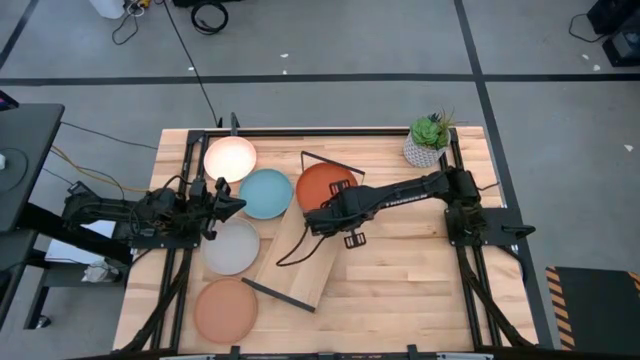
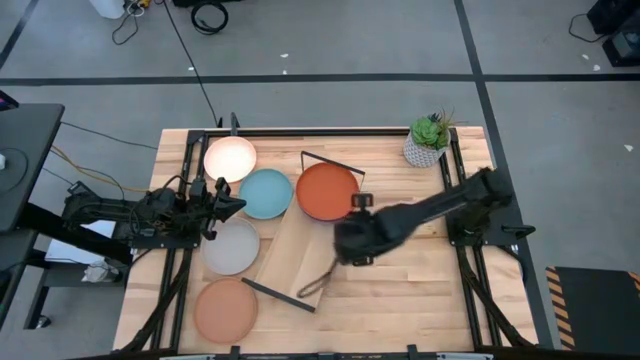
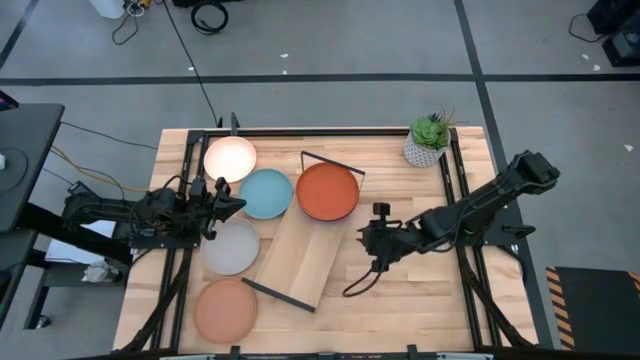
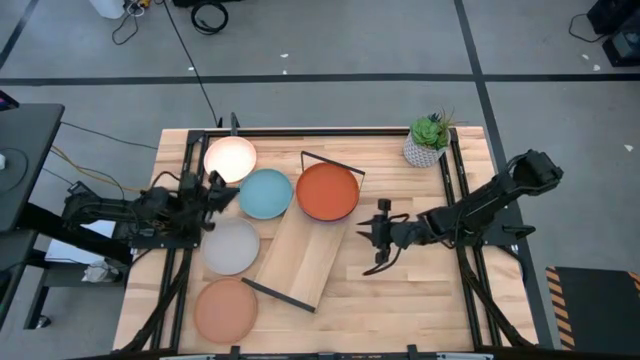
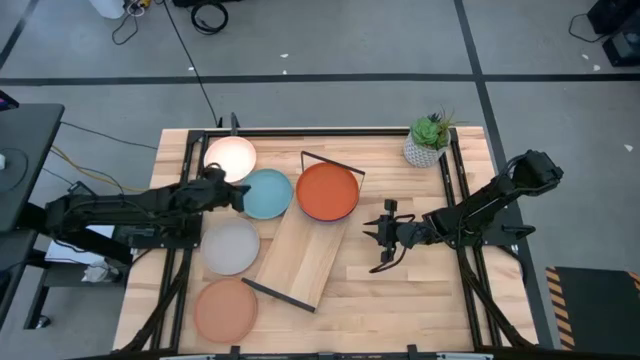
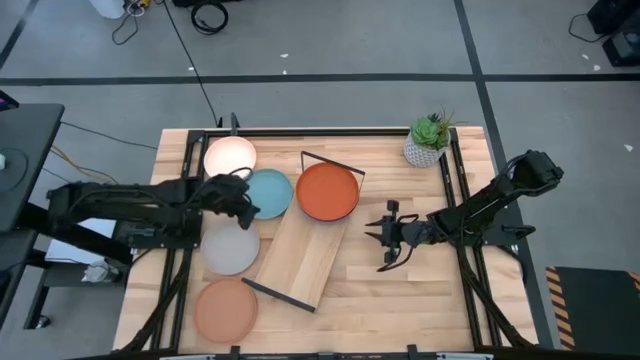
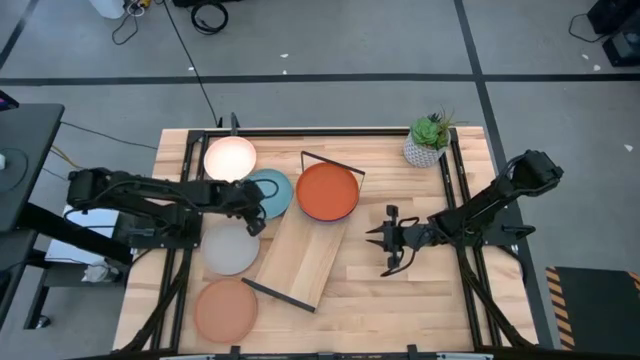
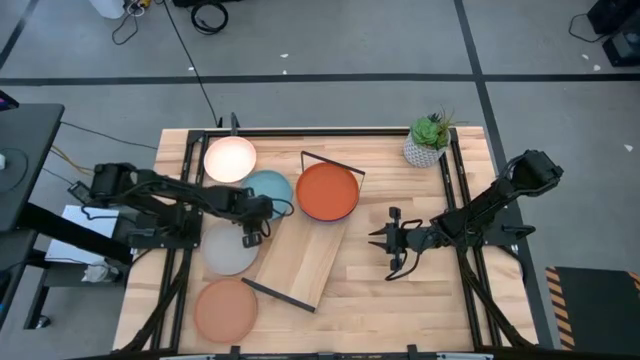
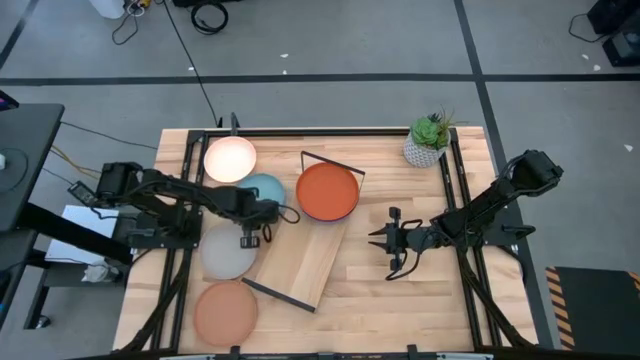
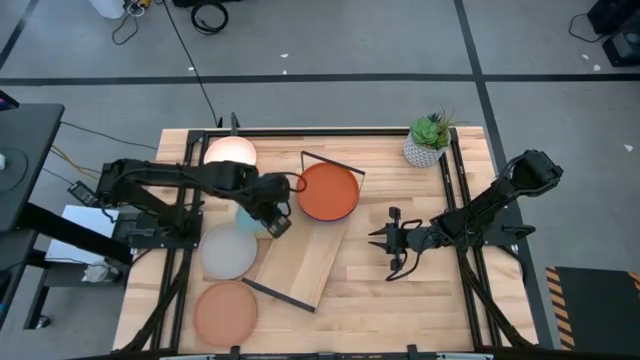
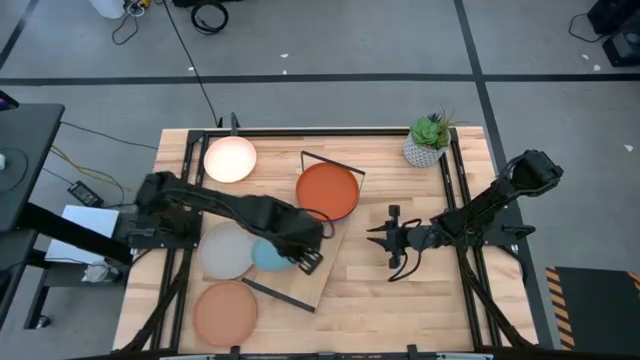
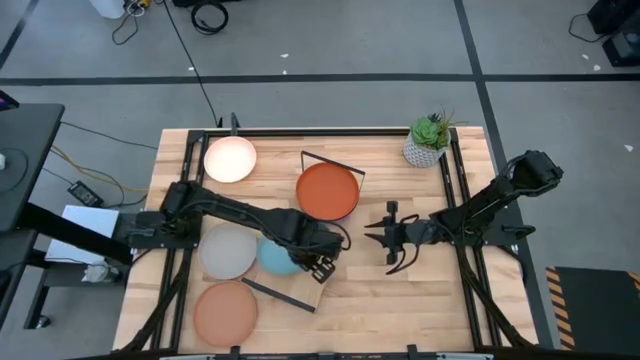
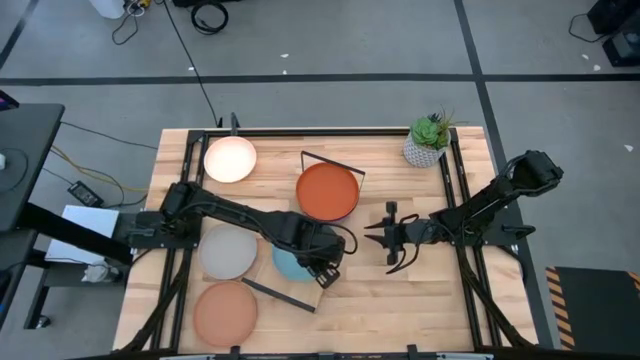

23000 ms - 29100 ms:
Task: Place and stack plates onto a shelf
Put the light blue plate on the shelf

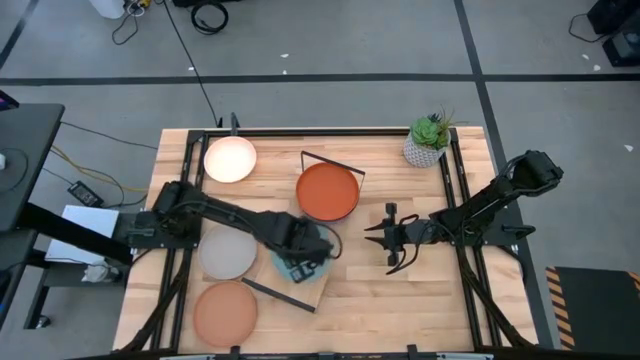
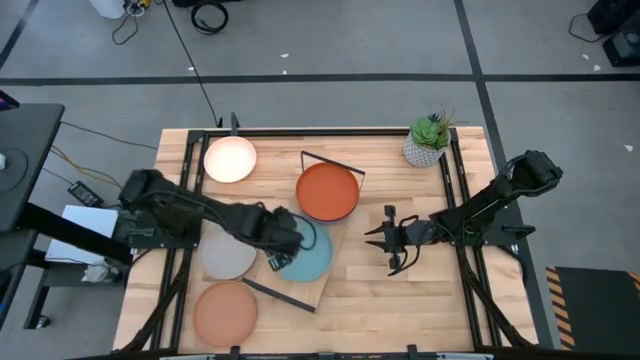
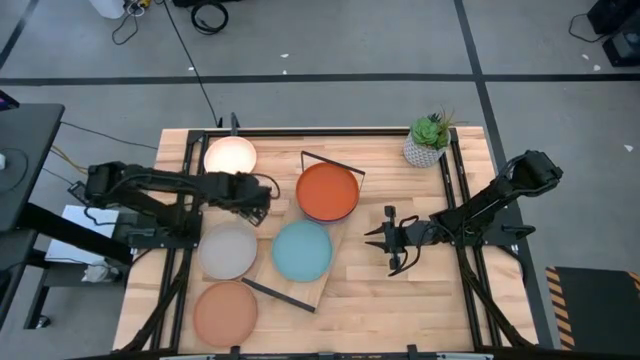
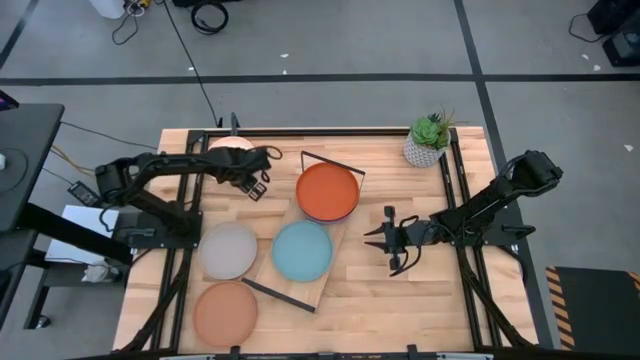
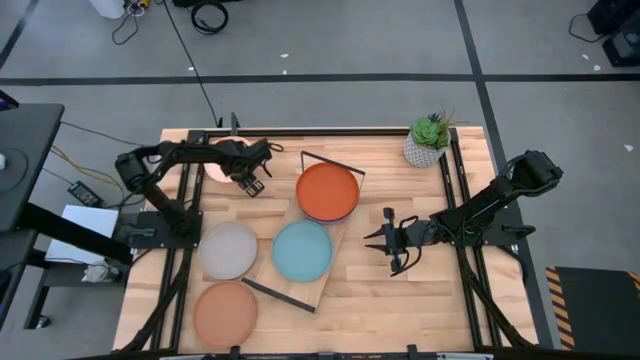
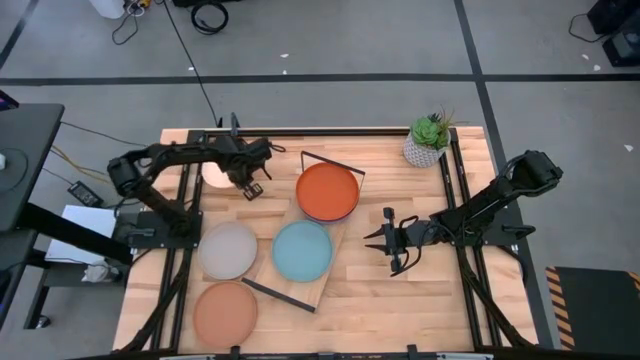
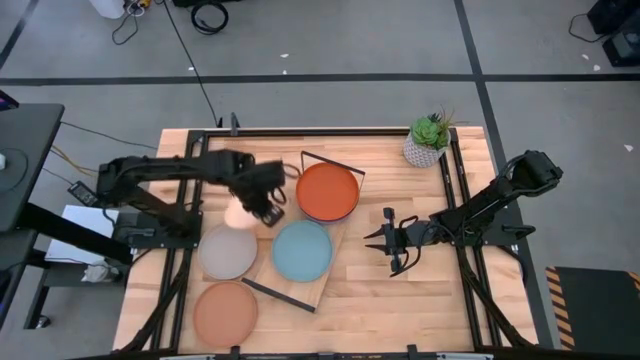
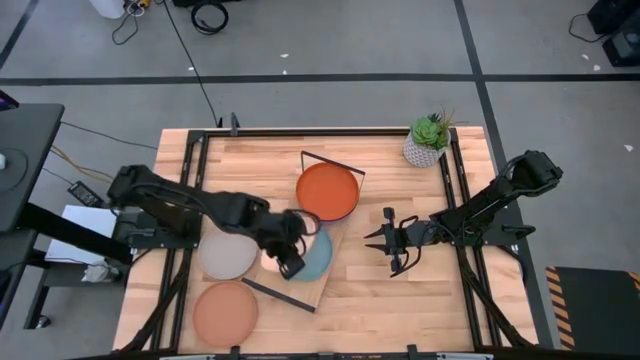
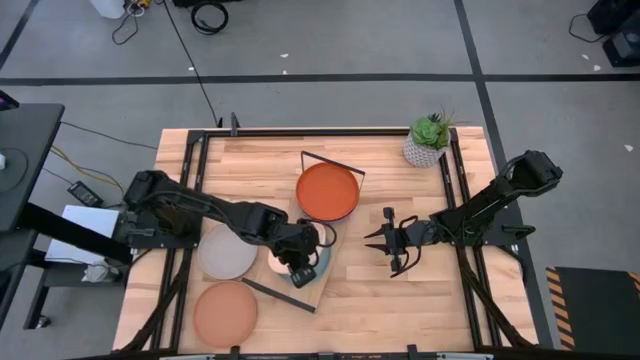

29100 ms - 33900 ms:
Stack the white plate on top of the light blue plate on the shelf

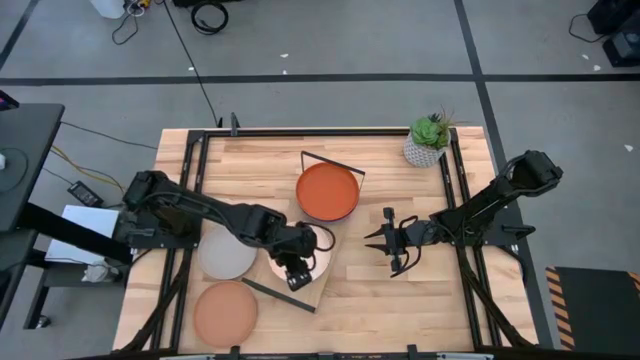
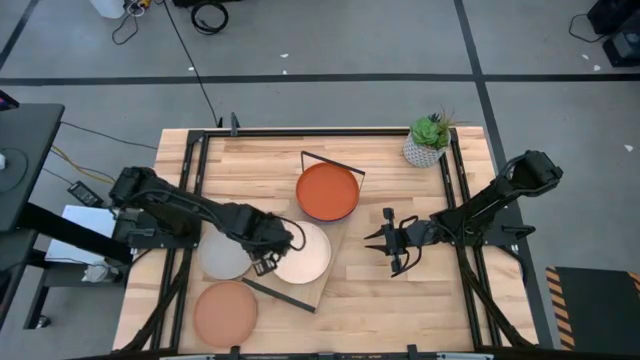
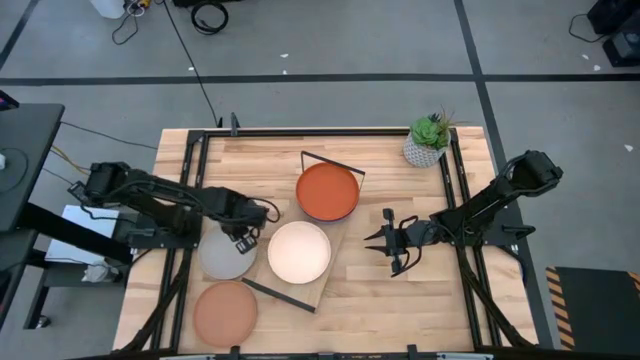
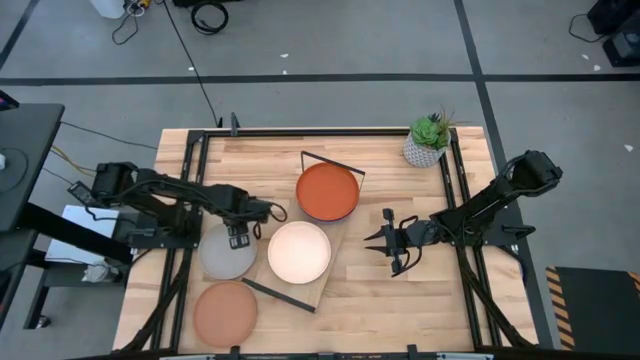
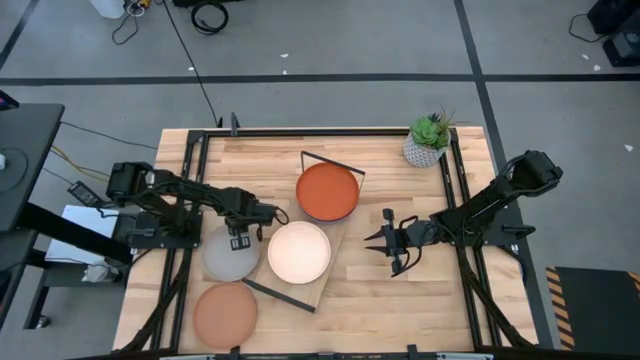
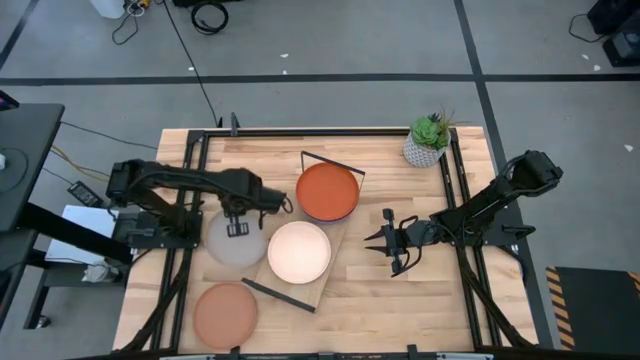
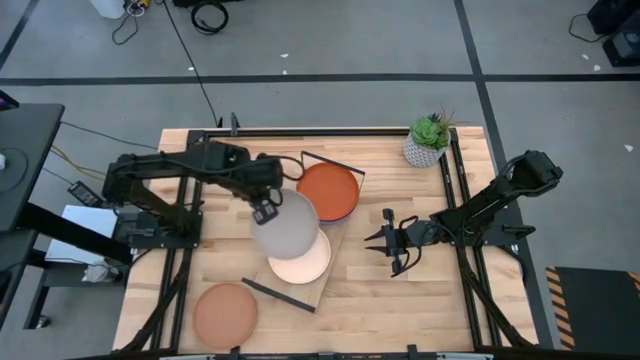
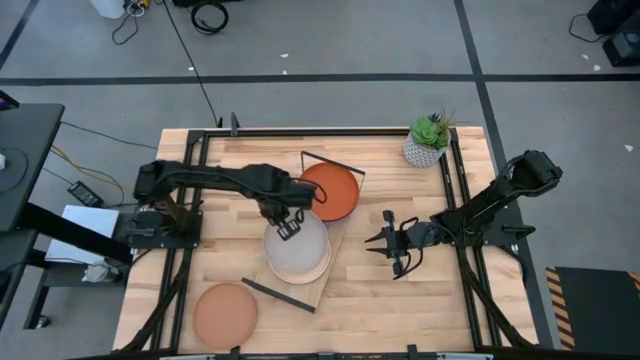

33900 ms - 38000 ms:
Stack the gray plate on top of the white plate on the shelf

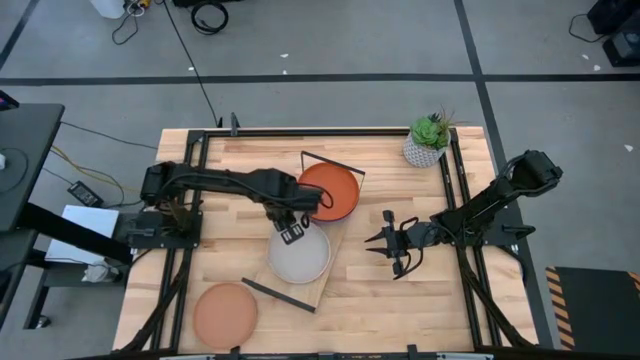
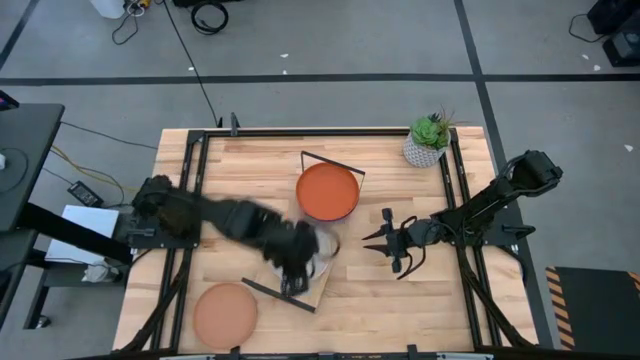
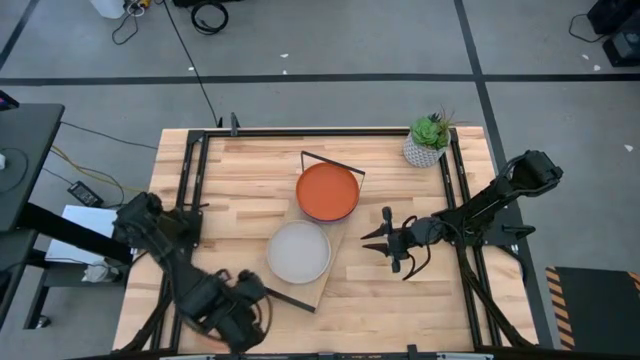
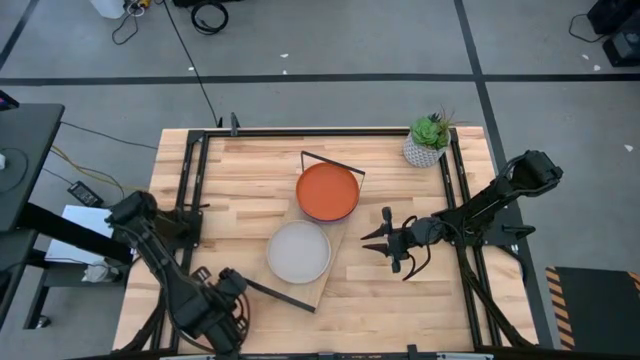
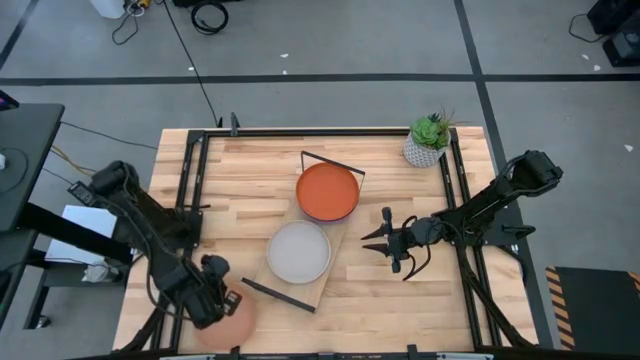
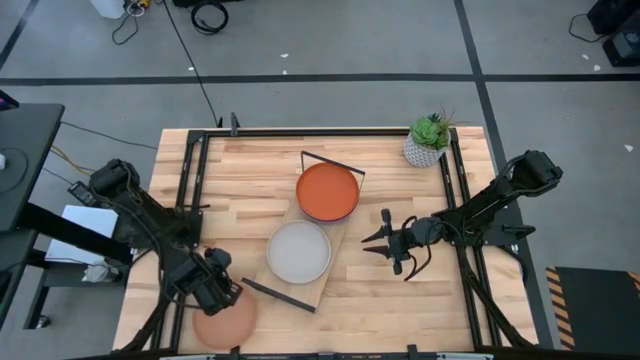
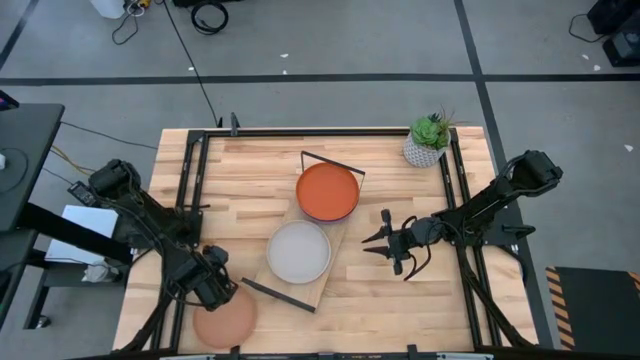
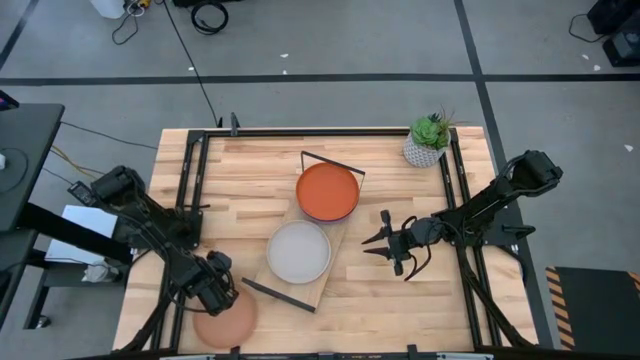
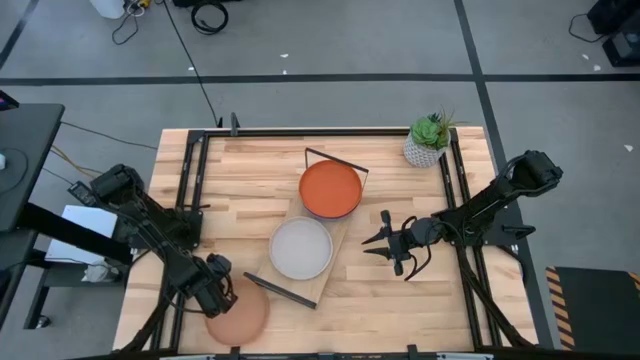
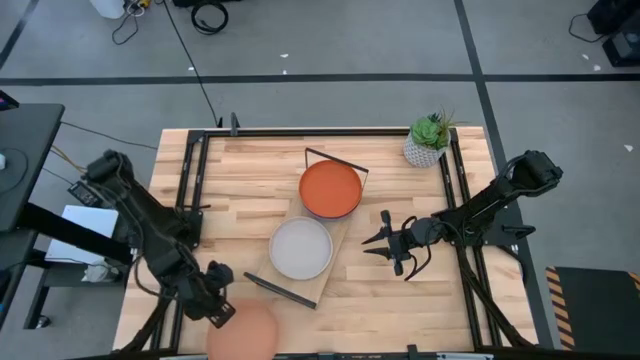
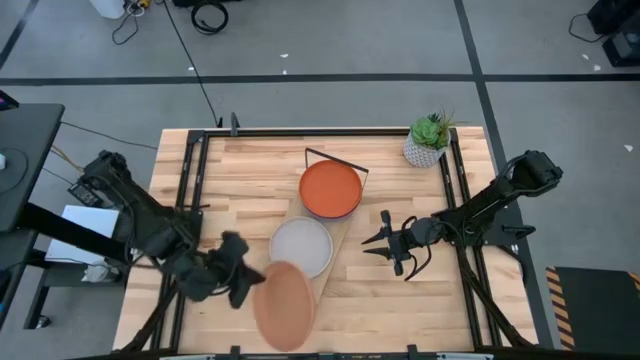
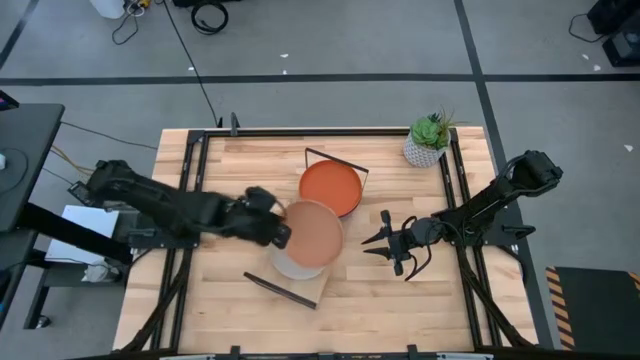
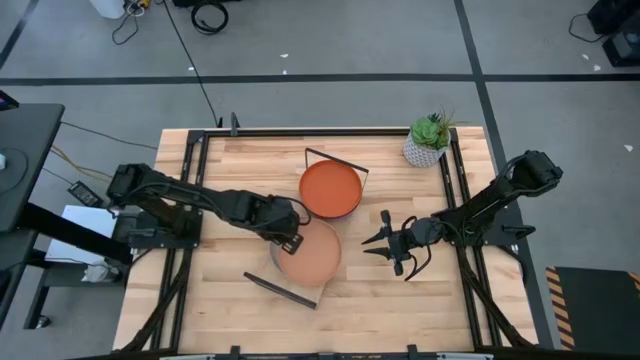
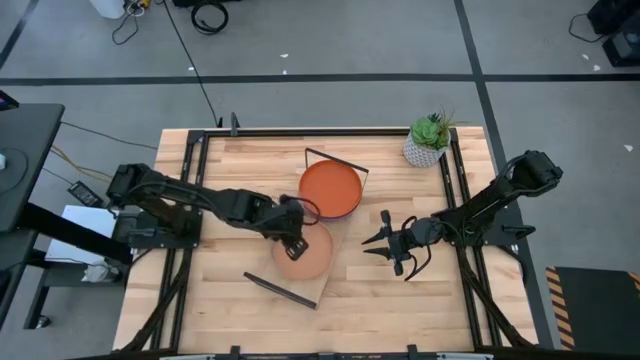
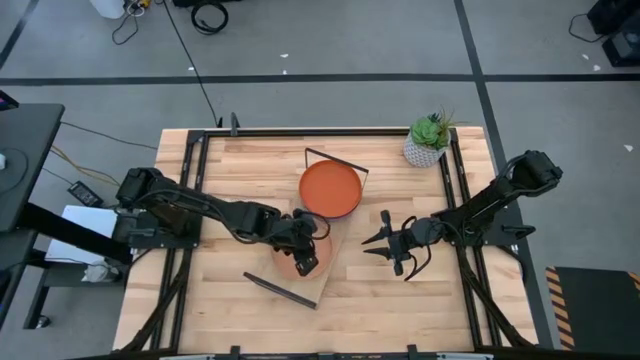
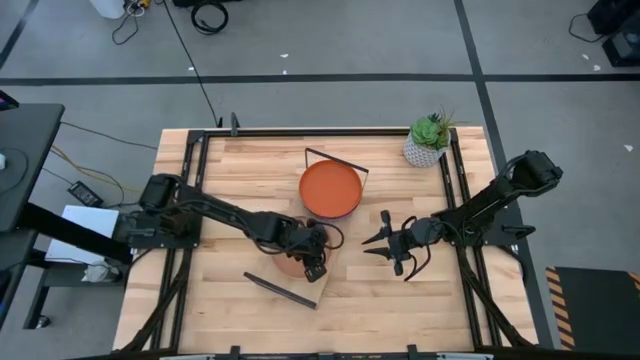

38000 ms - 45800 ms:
Stack the brown plate on top of the gray plate on the shelf
